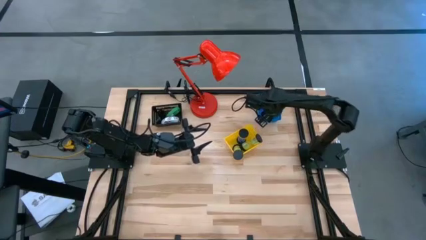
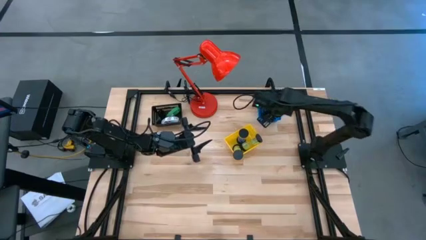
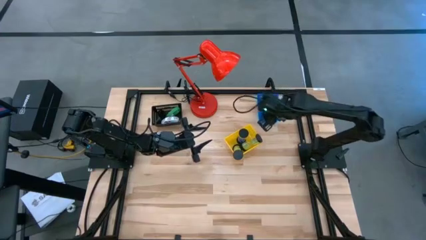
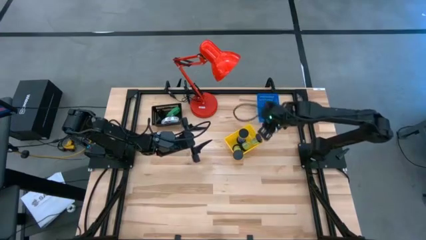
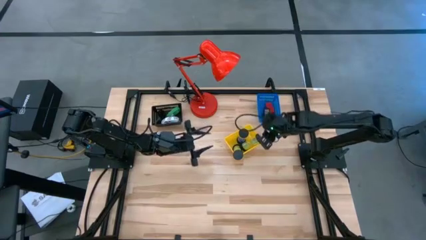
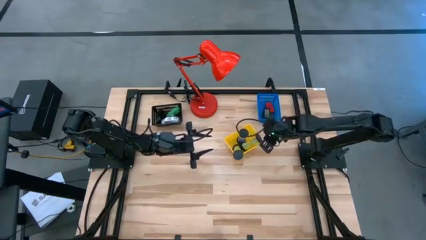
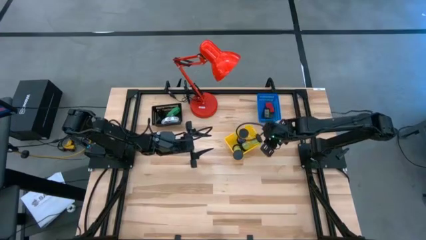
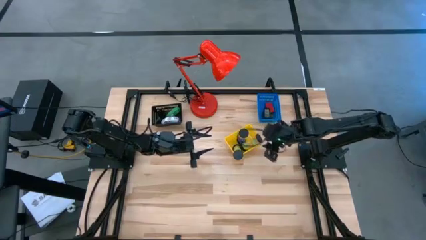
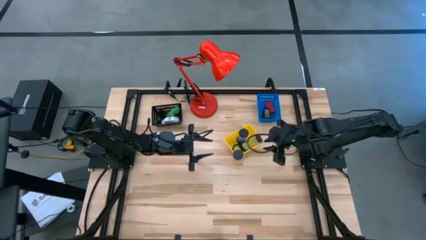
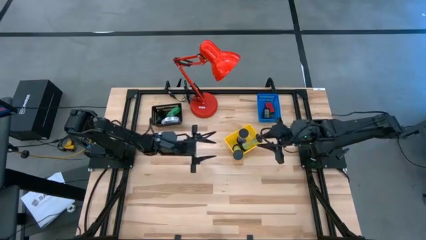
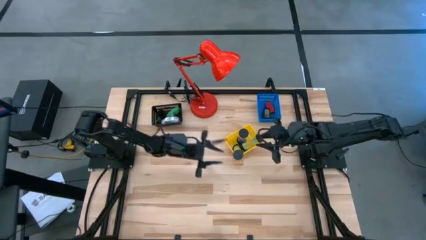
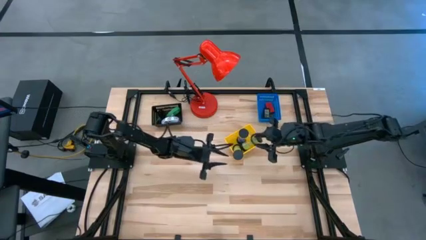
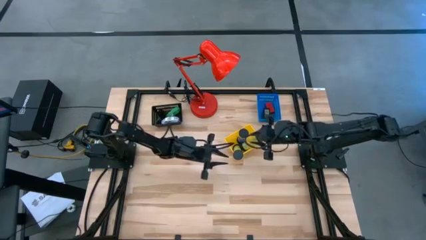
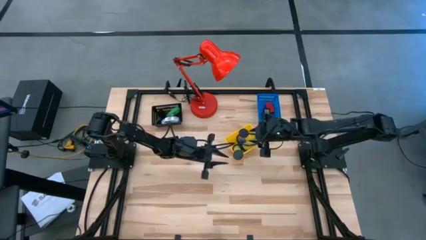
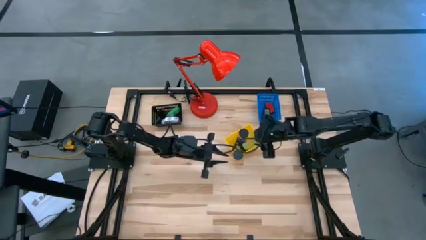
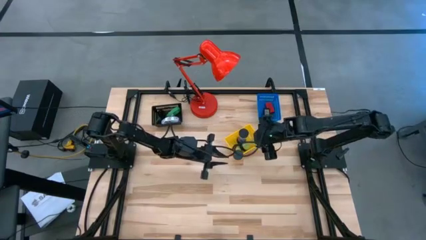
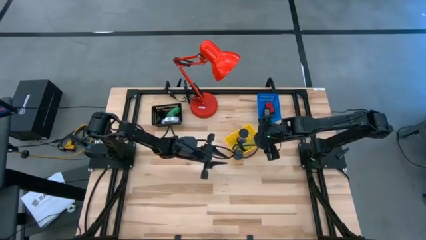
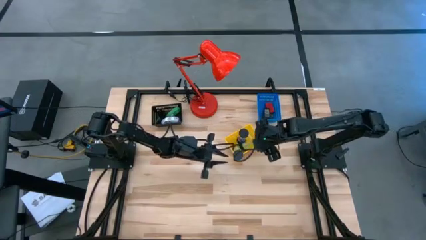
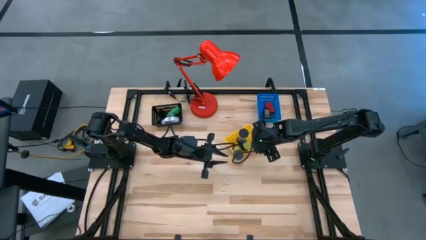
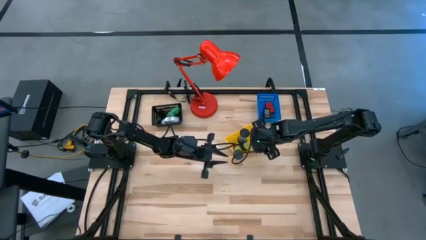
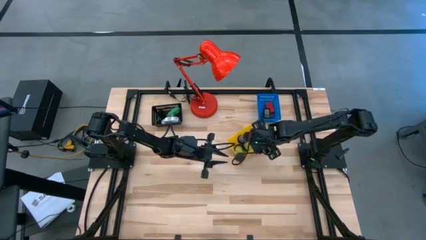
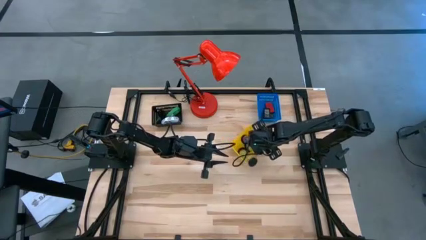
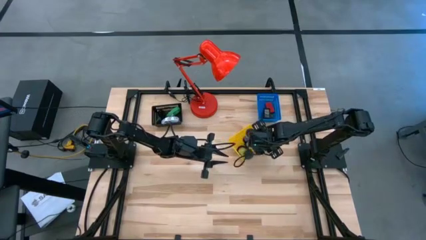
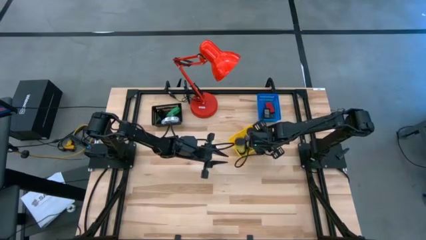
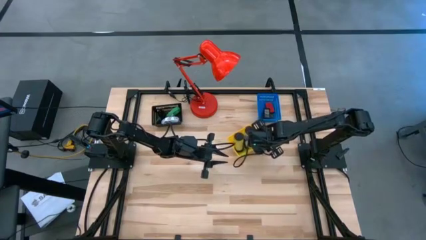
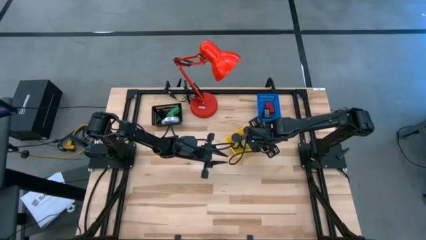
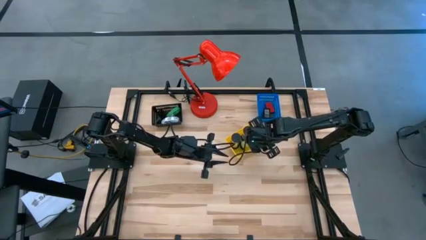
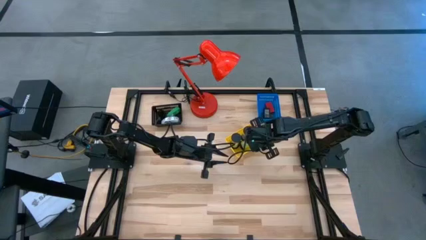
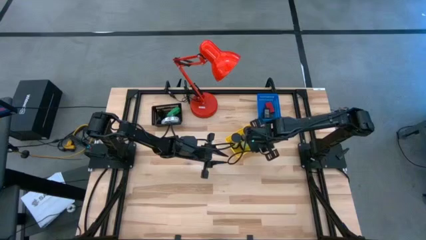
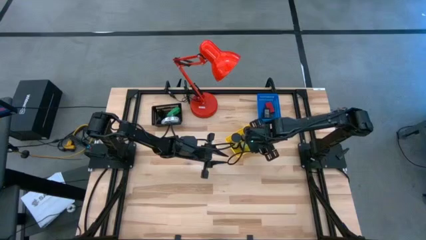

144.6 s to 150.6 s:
Task: Pick & Place Office items
Adjust the green hourglass

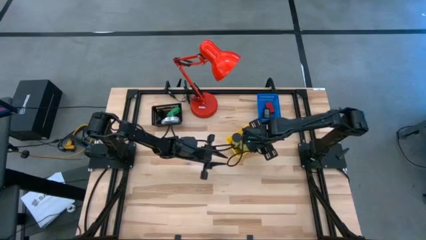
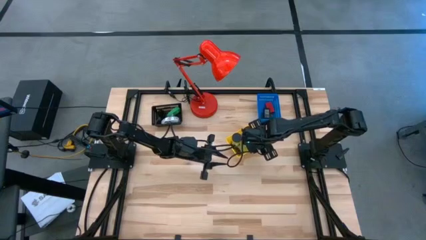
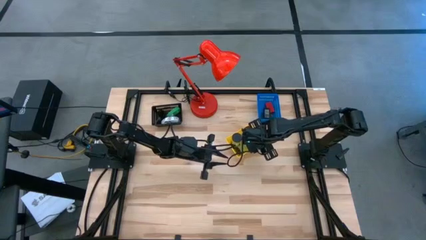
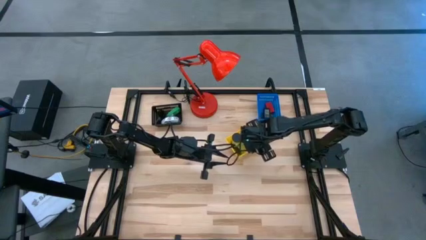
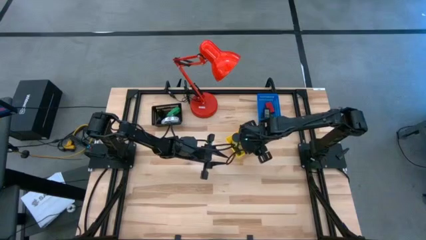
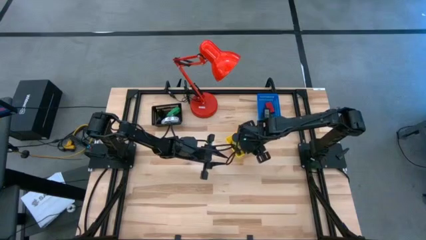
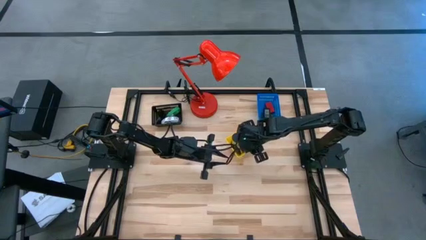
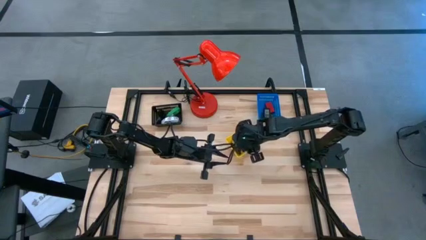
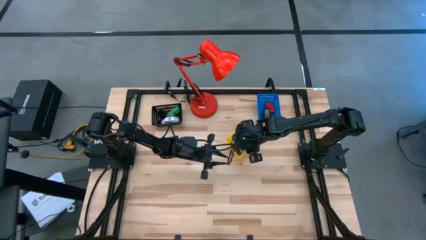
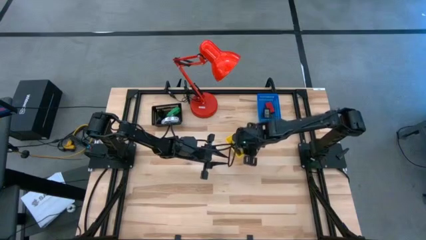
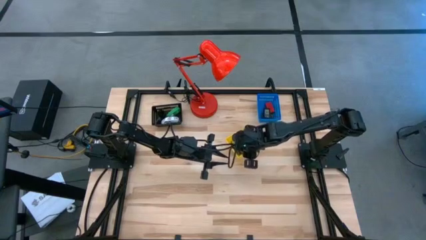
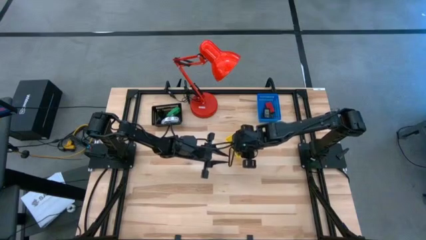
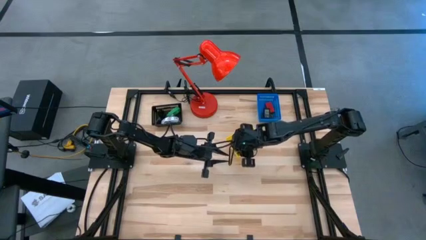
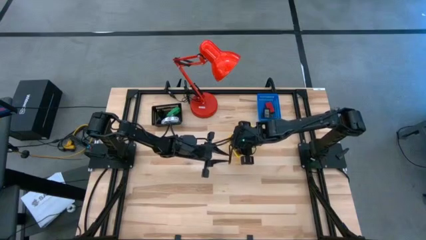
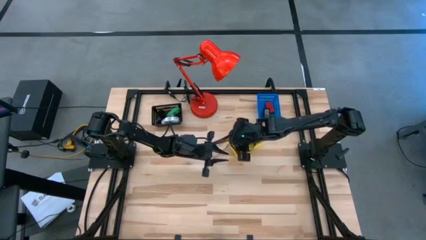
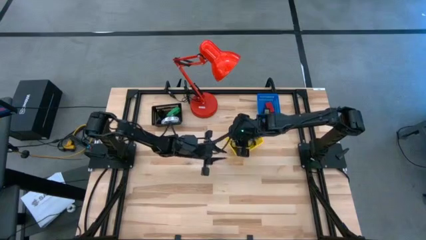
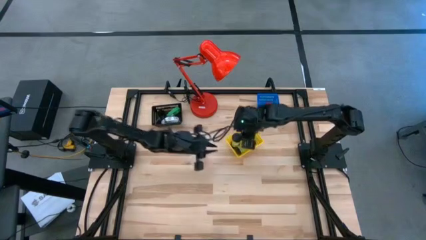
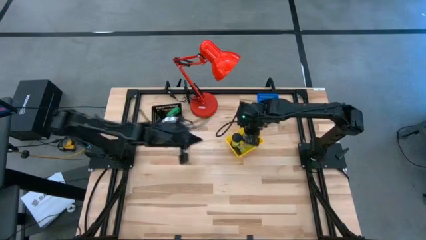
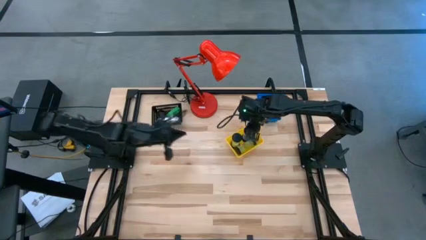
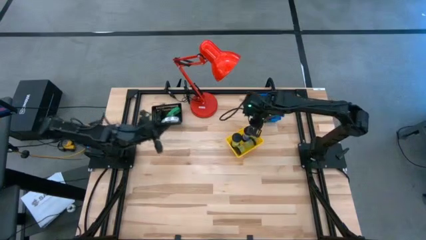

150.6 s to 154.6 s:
Return to Home Position
